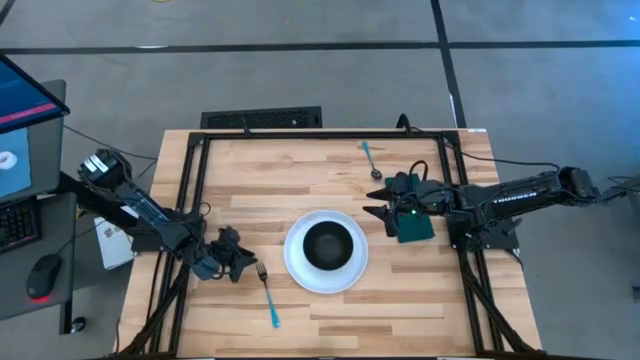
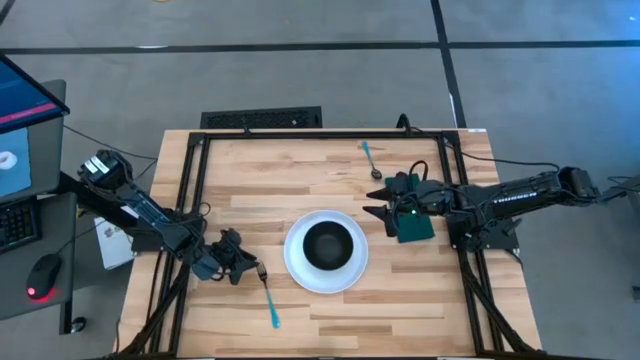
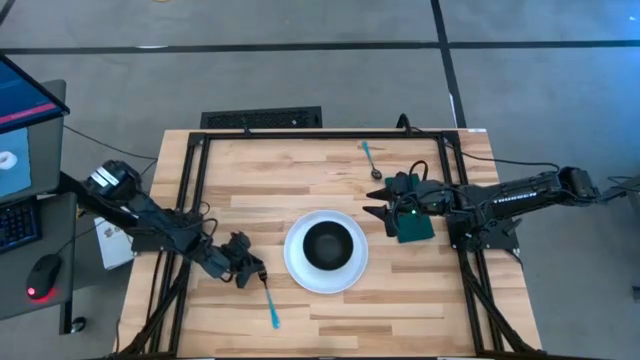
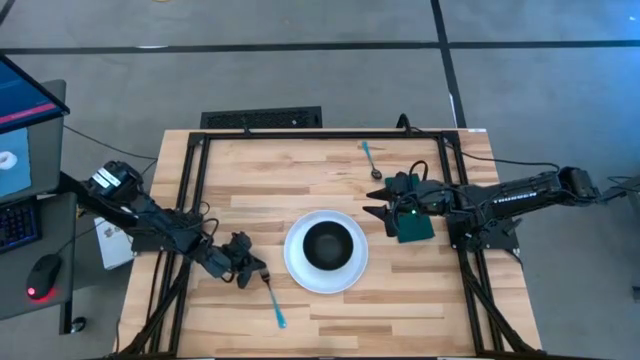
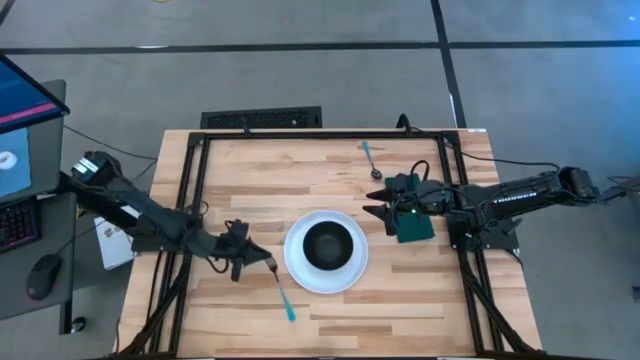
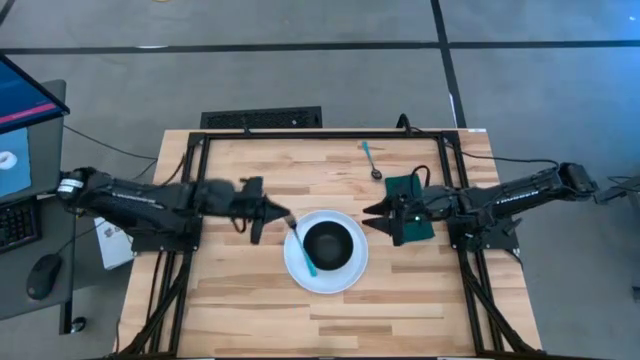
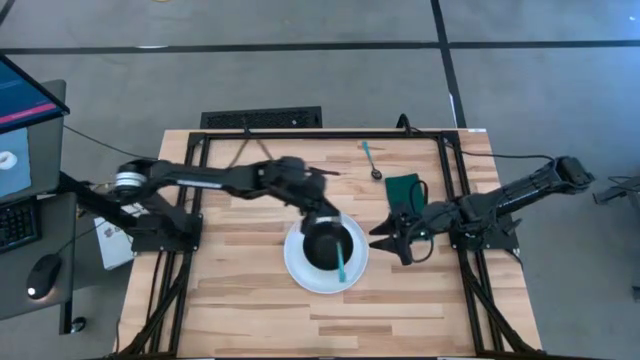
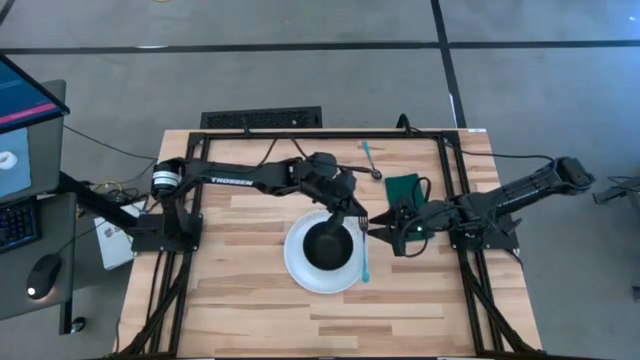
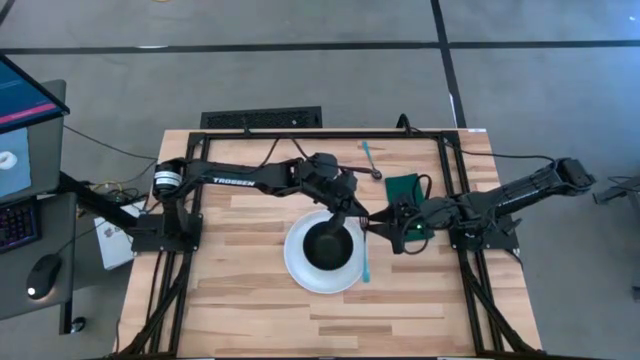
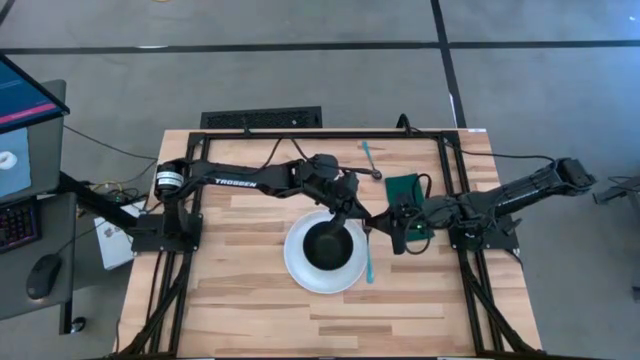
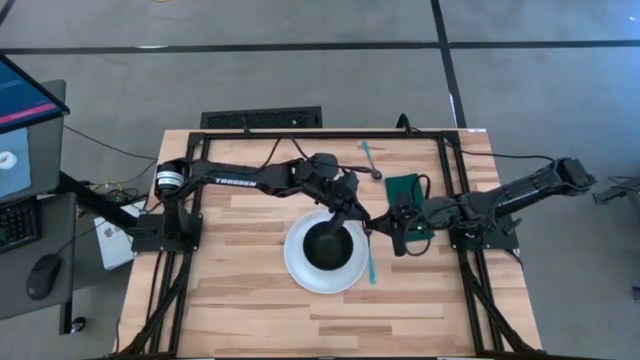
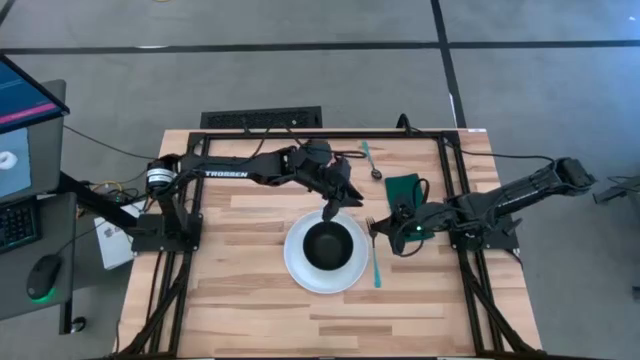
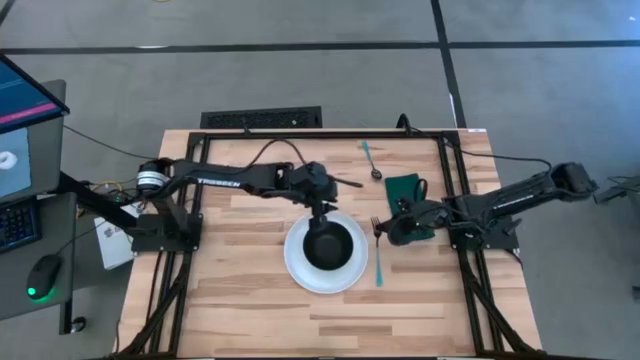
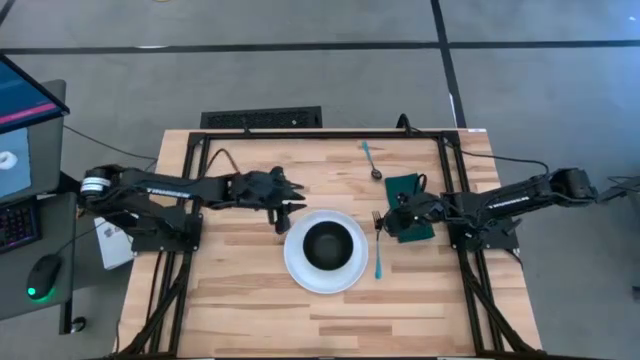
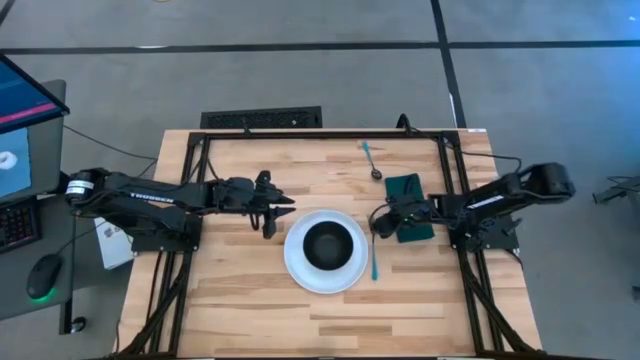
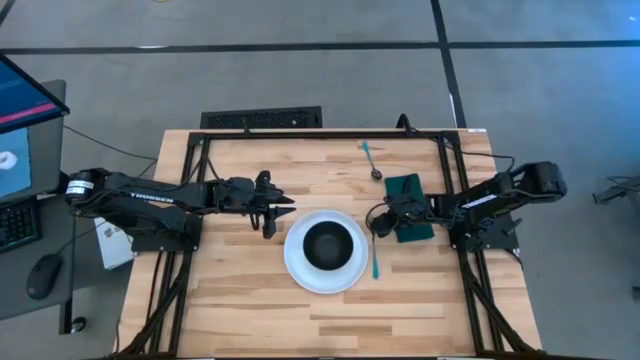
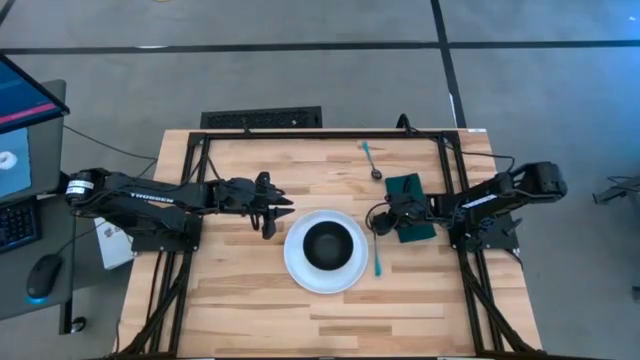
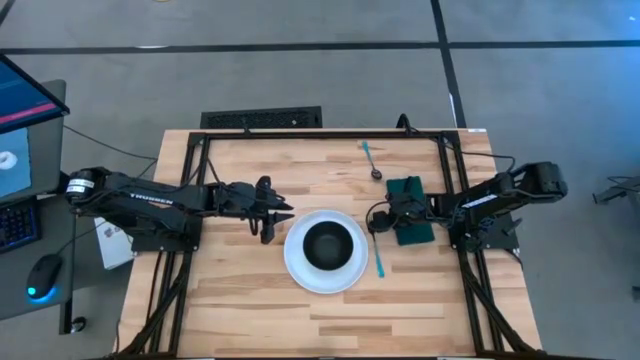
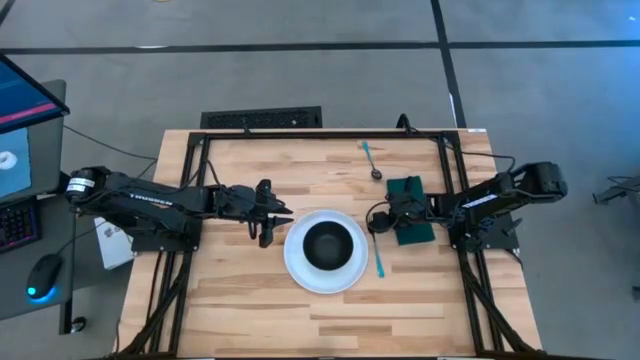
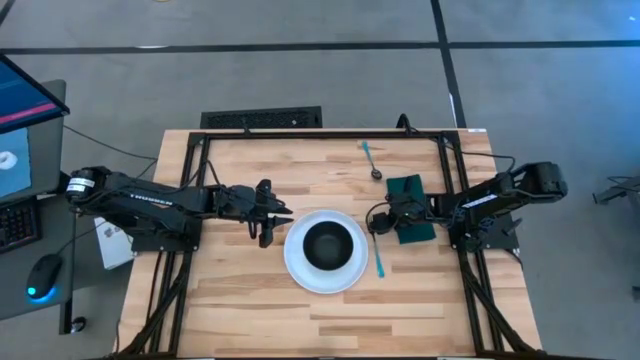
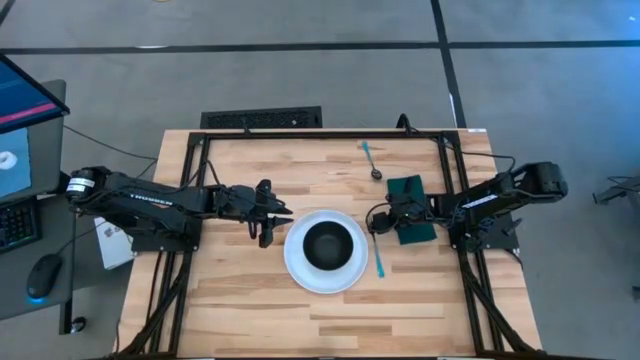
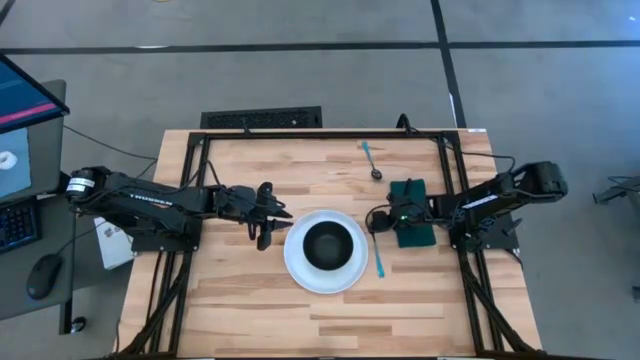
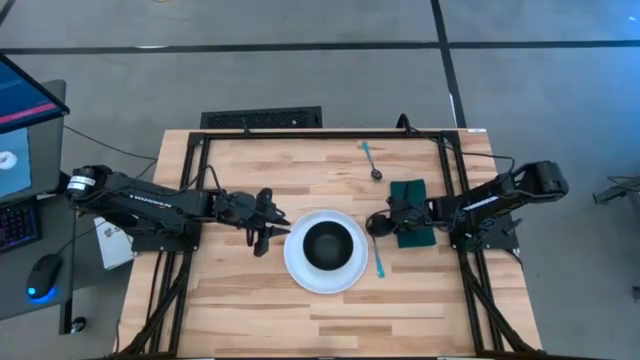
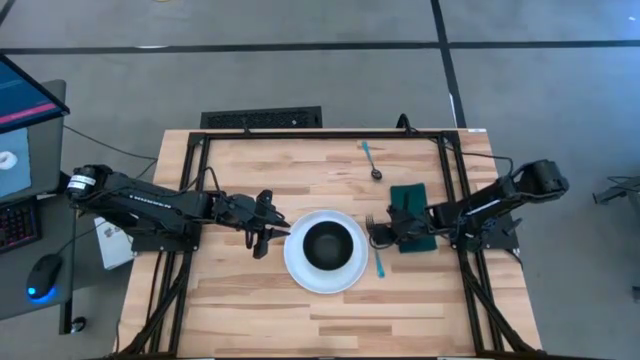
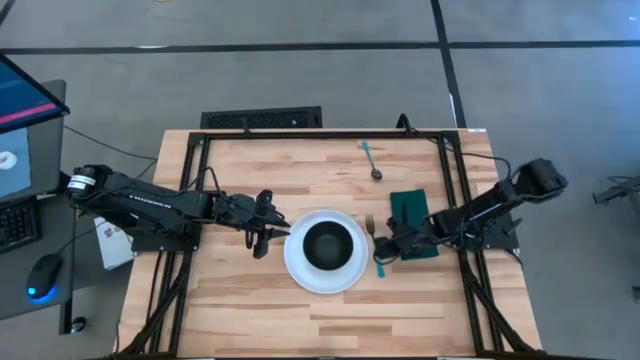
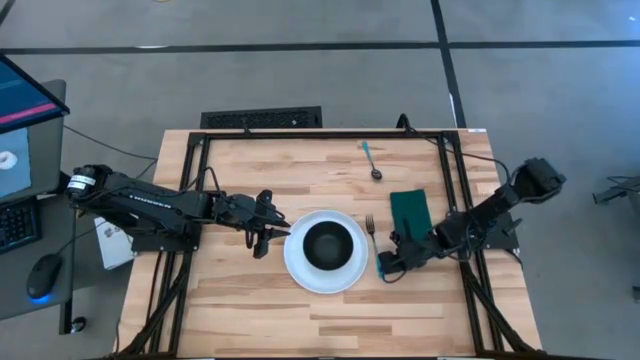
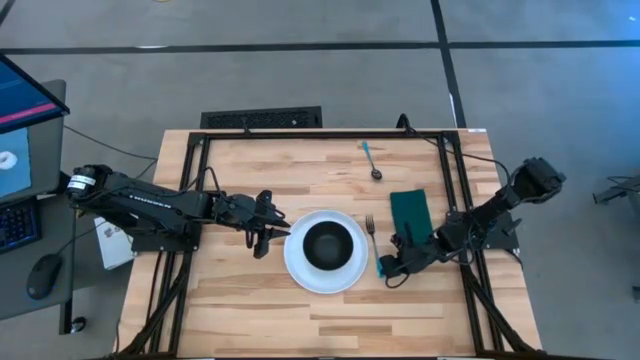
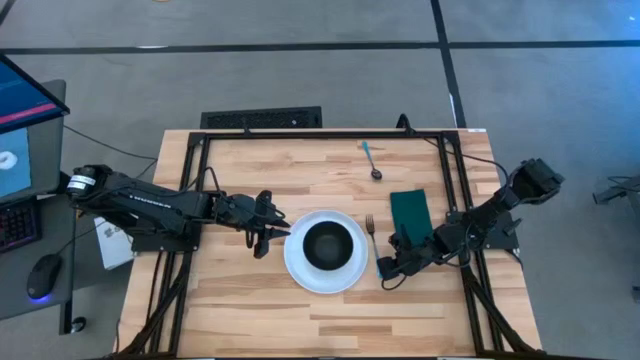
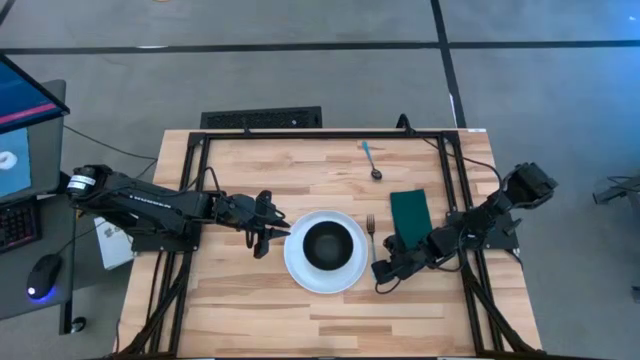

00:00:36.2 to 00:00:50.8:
Task: Set table place
Put the blue fork to the right of the white plate

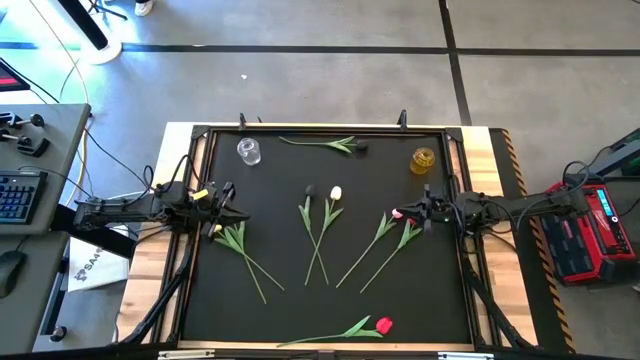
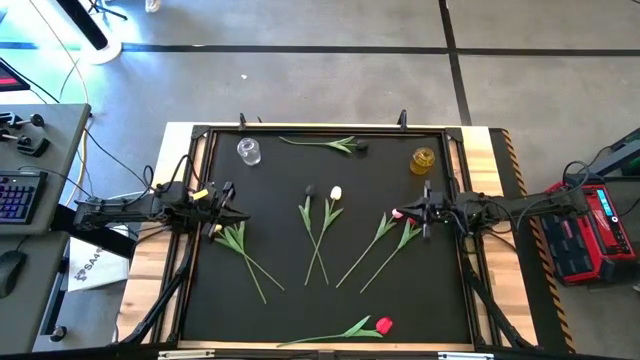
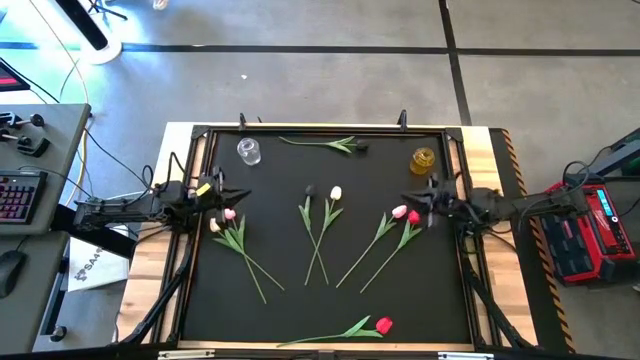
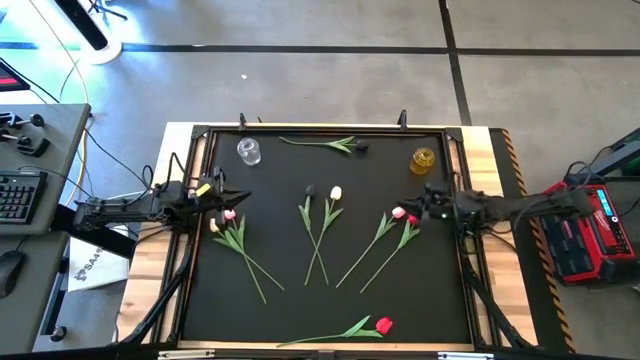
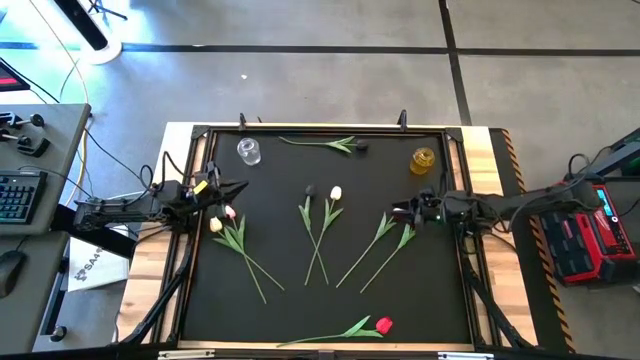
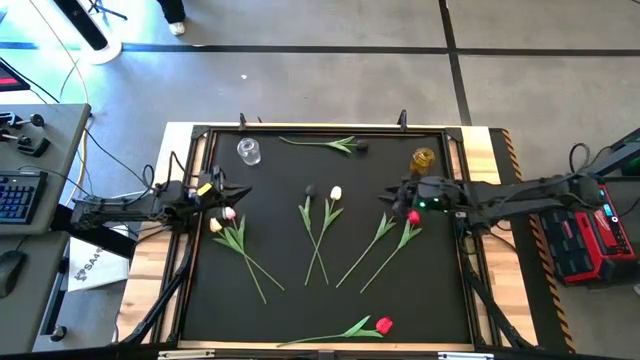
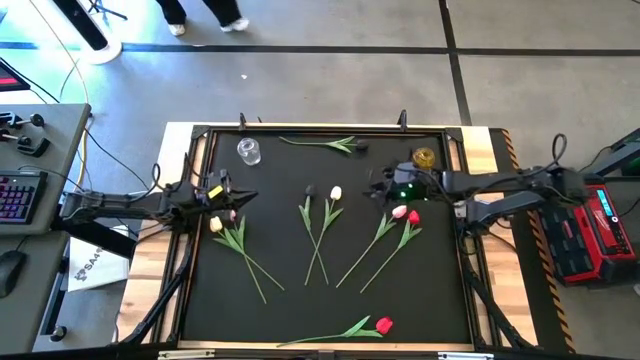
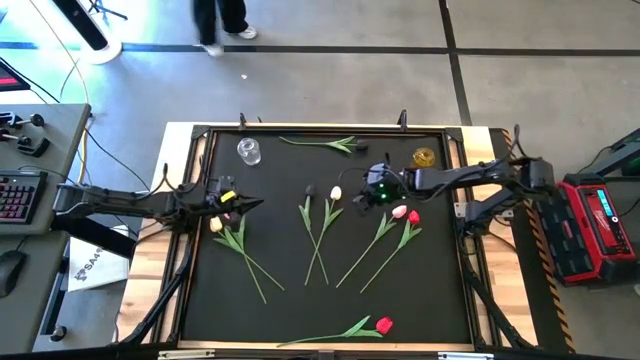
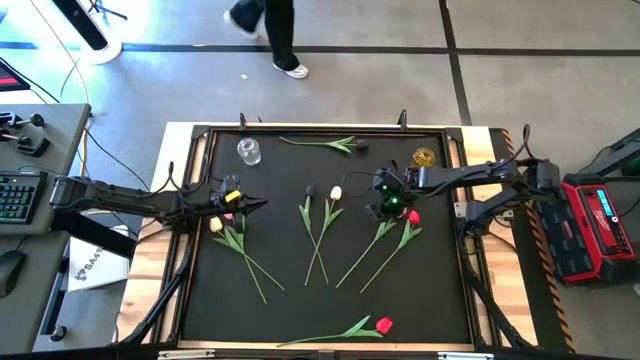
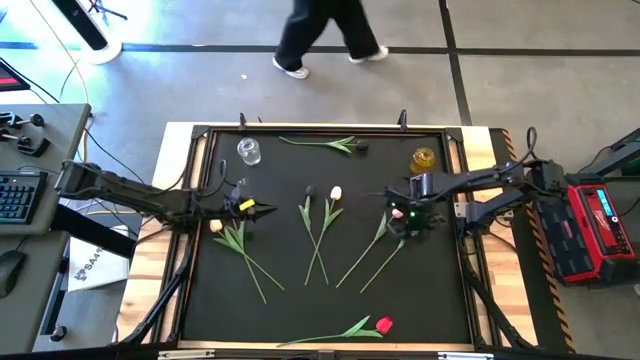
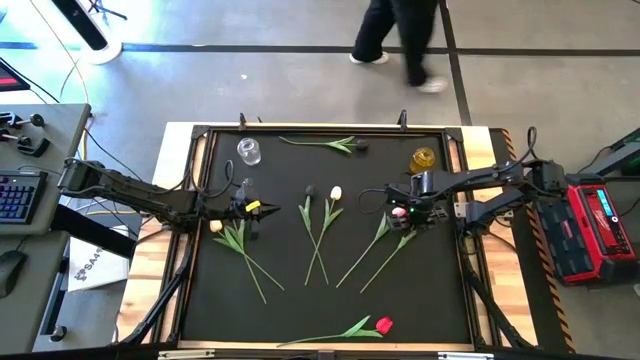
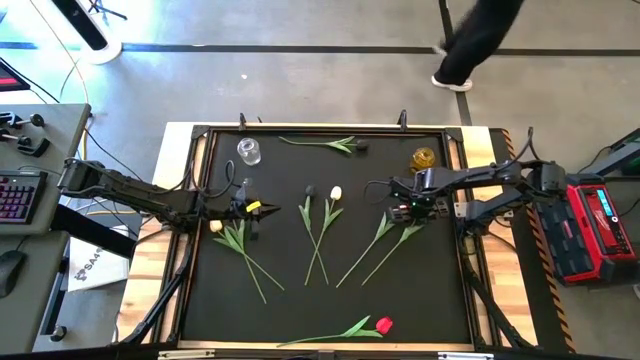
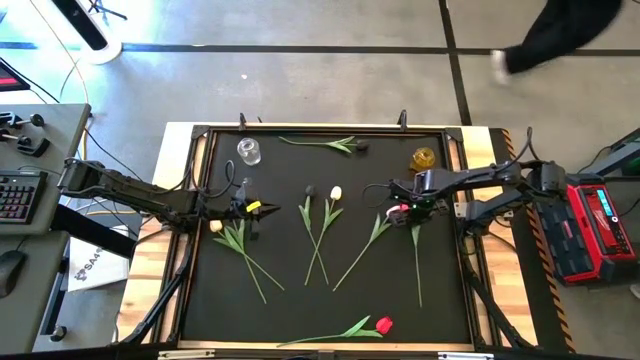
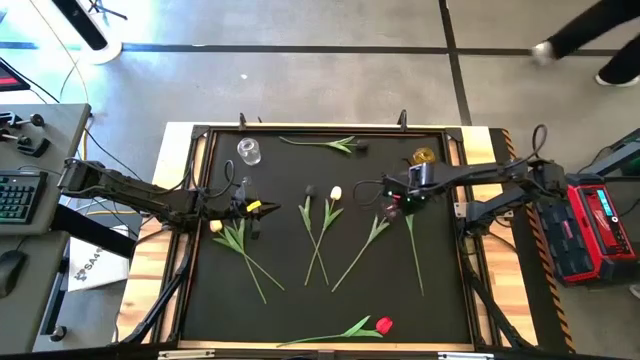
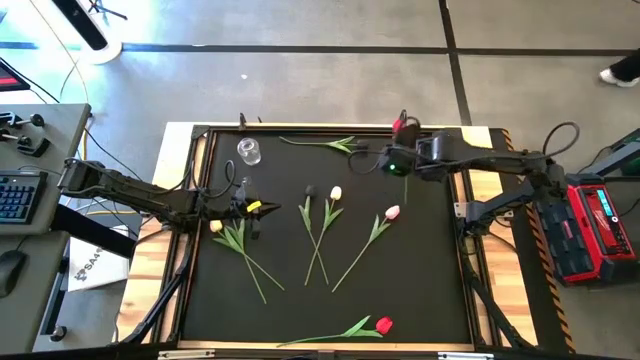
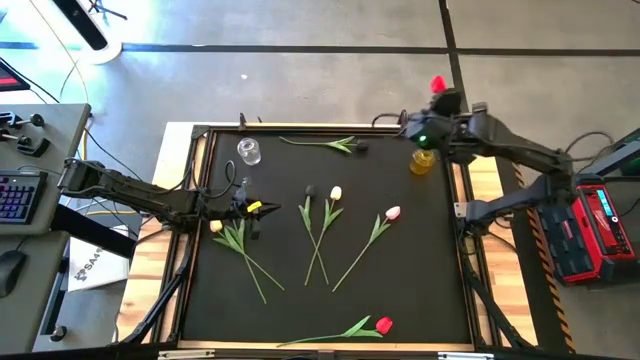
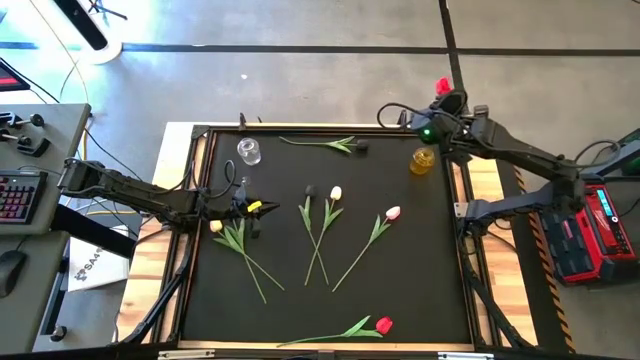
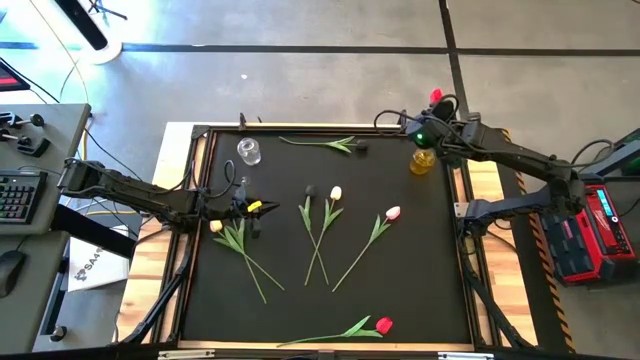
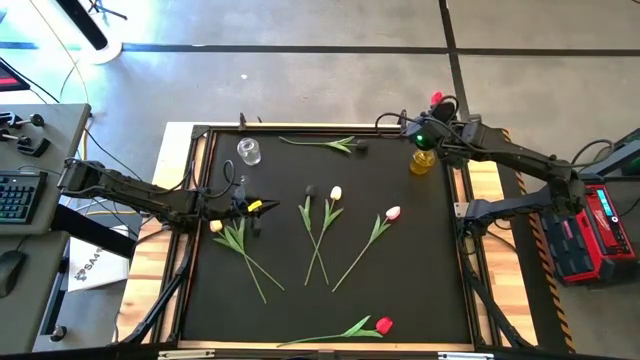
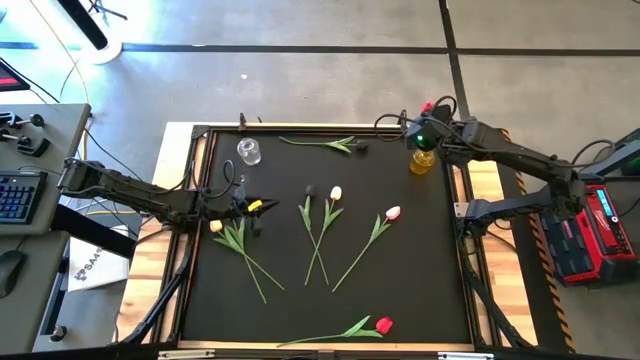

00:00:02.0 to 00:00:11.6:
Task: Sort flowers into vase by color
Put the top red flower into the yellow flower vase
